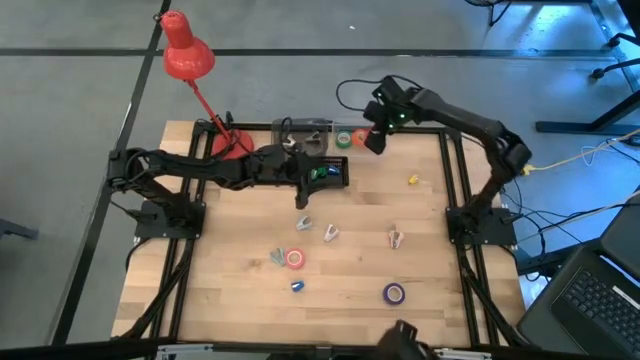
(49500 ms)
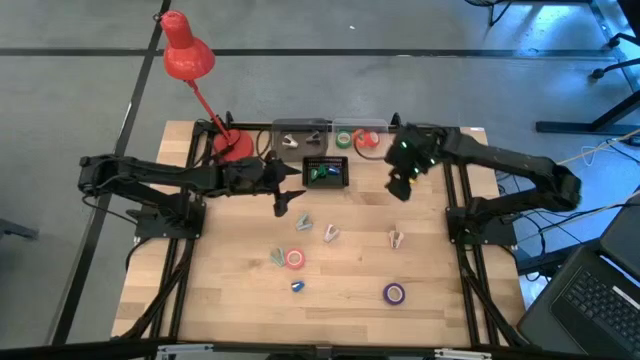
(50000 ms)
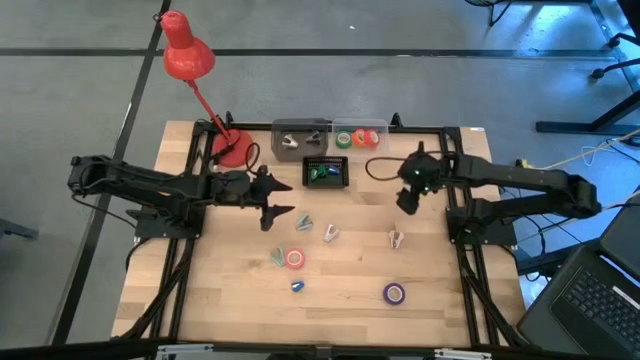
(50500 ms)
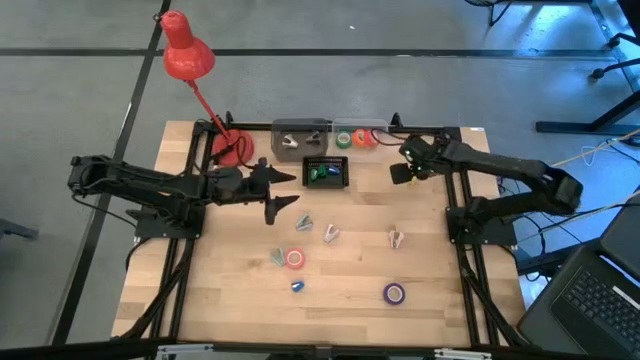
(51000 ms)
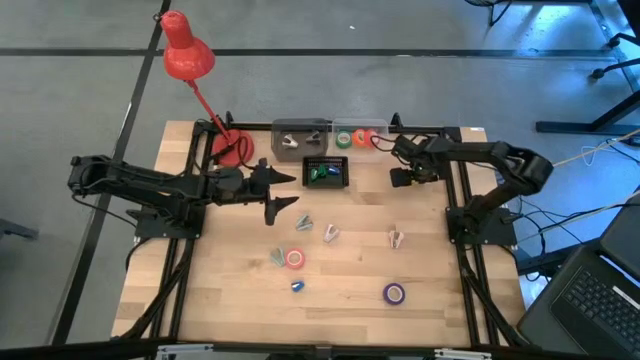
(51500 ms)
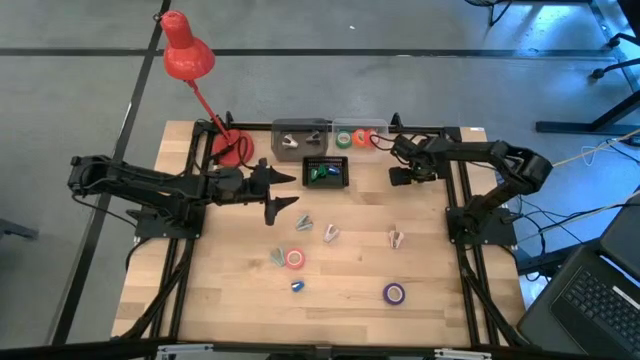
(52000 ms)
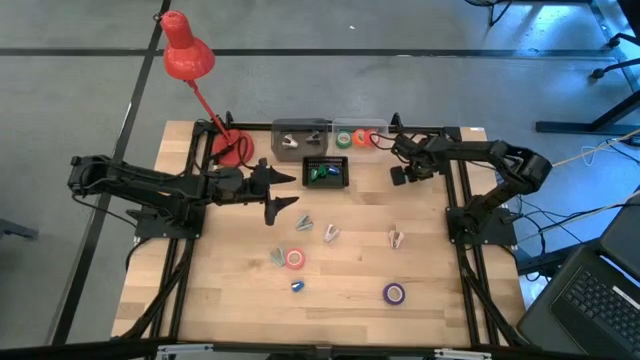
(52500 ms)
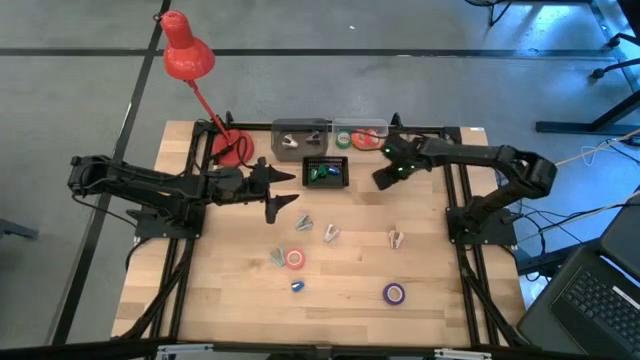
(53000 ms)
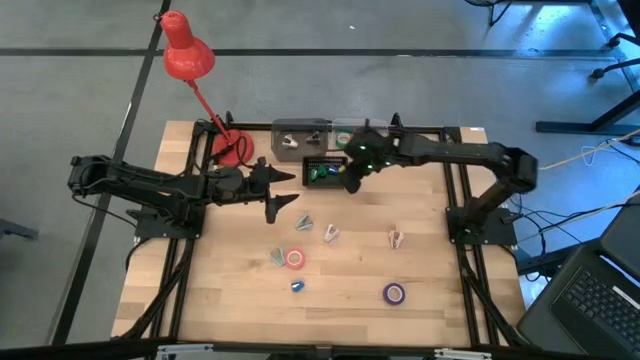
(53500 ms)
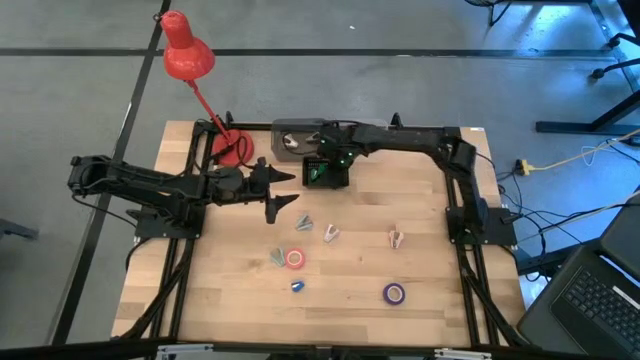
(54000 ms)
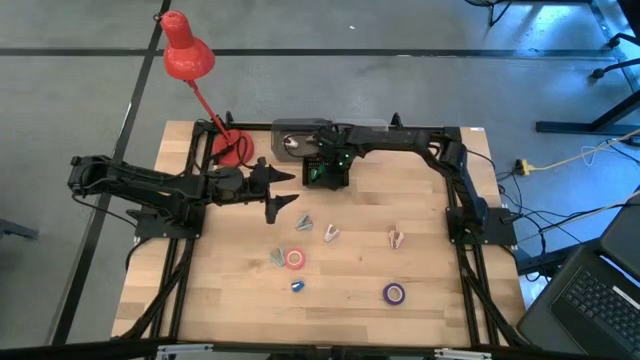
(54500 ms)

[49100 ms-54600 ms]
Task: Pick and place Stapler, Stapler remover, tape
Put the yellow stapler into the black bin

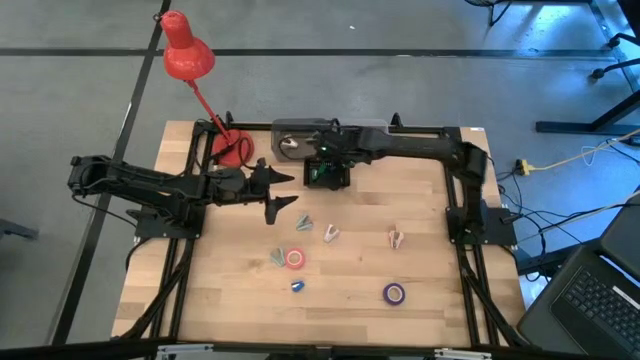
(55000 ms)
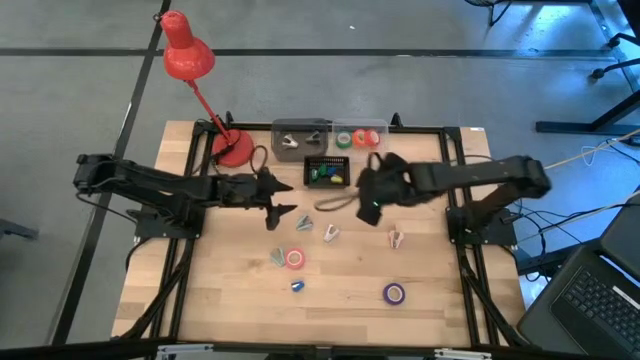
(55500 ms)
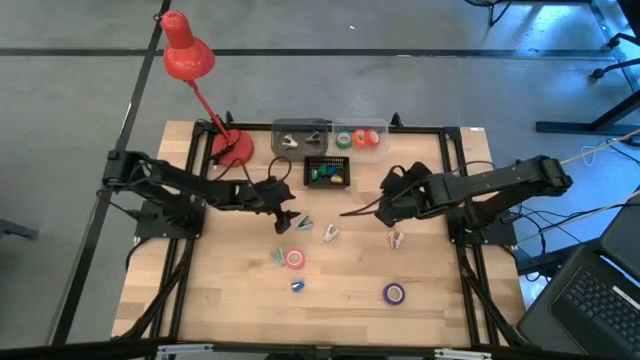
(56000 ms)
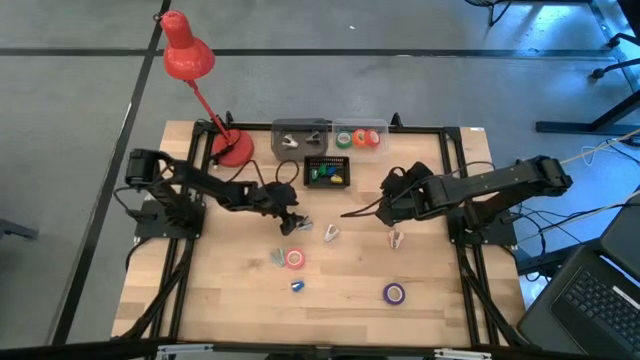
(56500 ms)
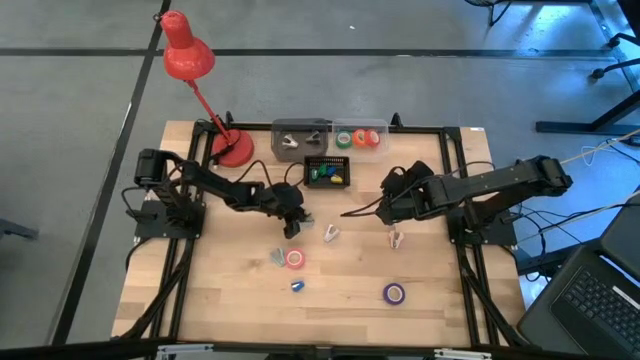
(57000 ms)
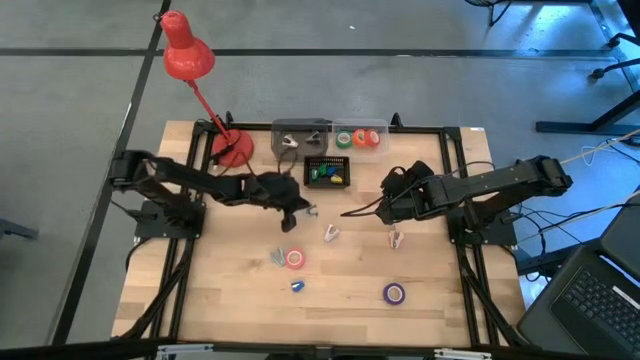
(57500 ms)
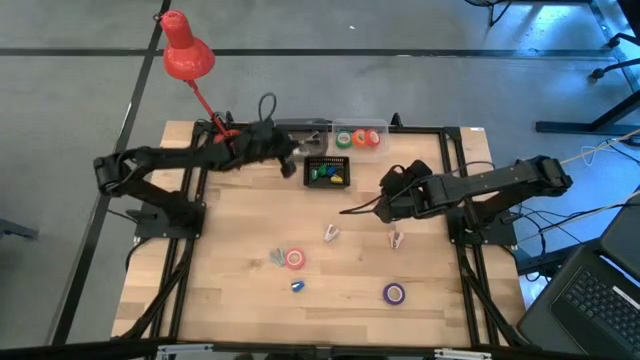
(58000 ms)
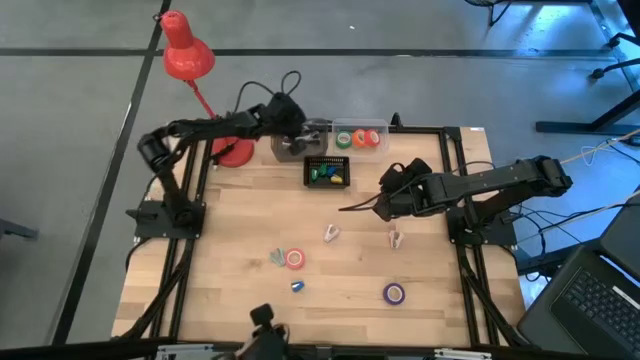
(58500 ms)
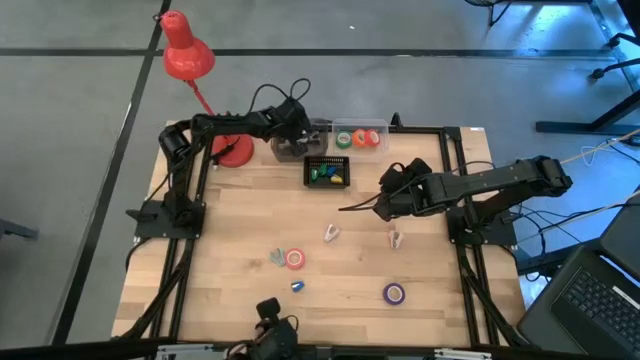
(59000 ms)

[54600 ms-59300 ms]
Put the blue staple remover into the gray bin

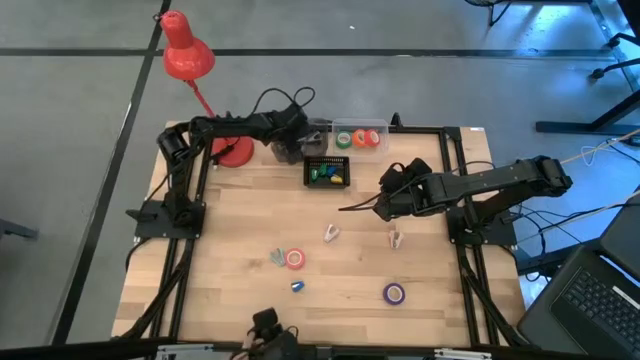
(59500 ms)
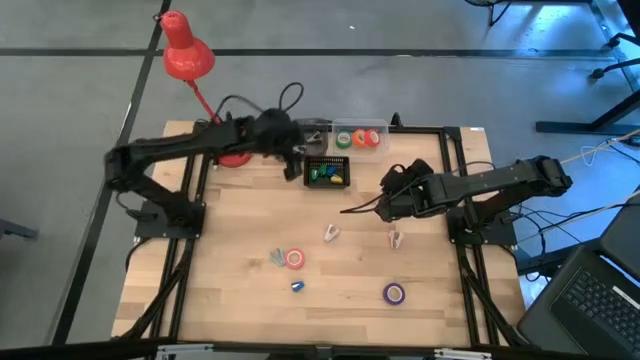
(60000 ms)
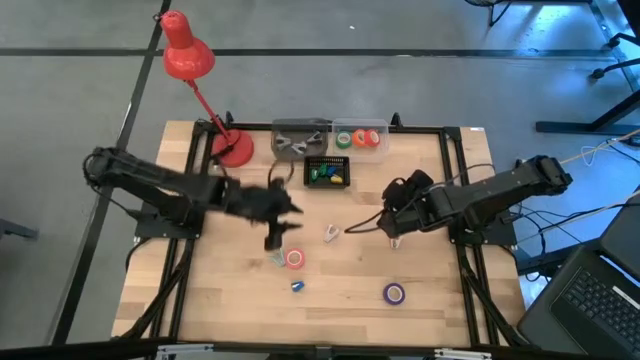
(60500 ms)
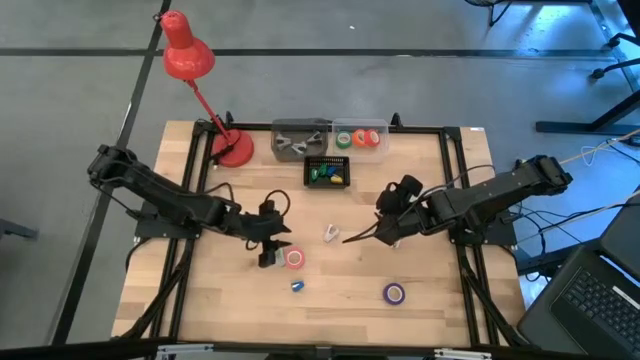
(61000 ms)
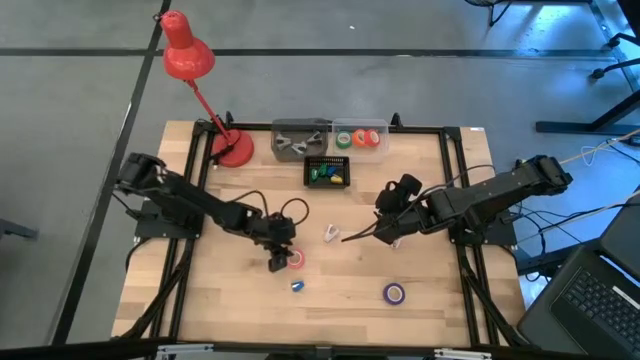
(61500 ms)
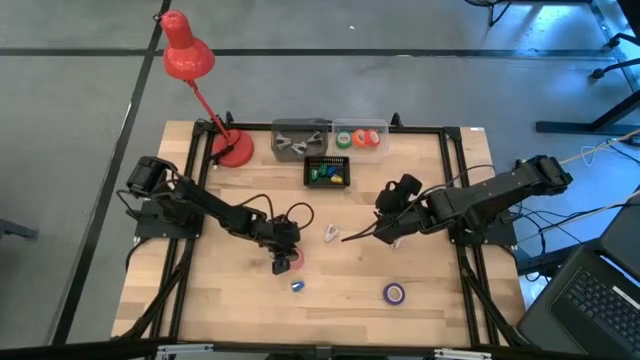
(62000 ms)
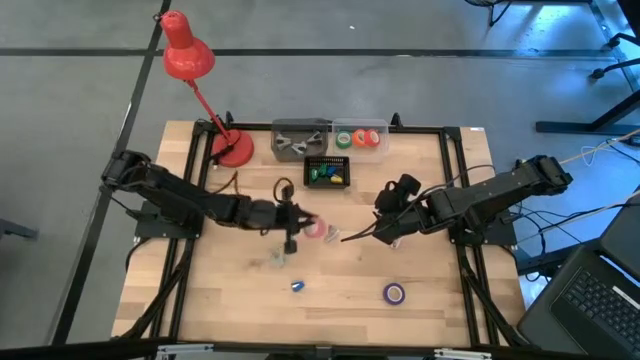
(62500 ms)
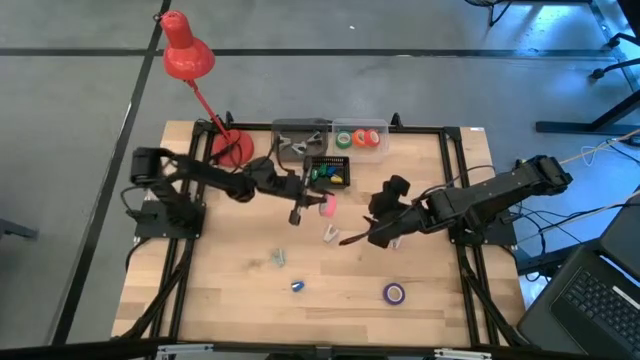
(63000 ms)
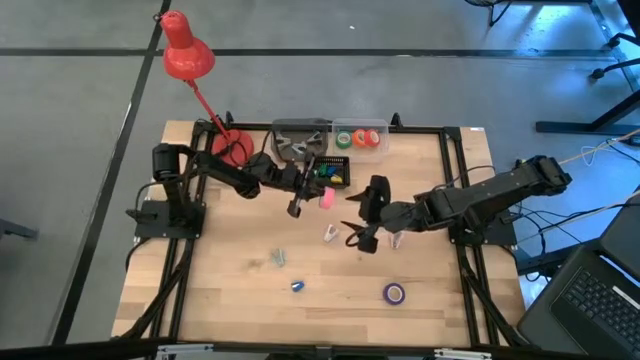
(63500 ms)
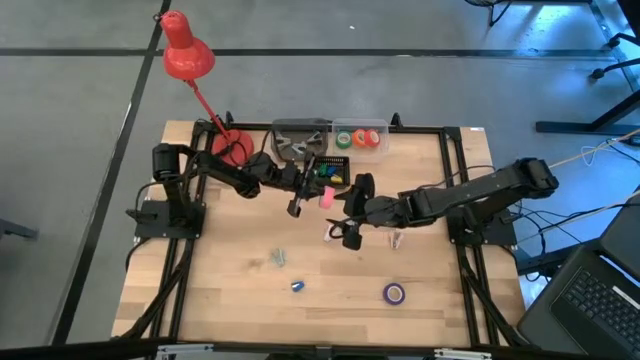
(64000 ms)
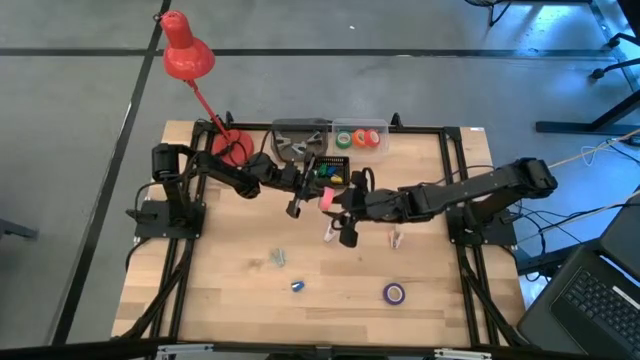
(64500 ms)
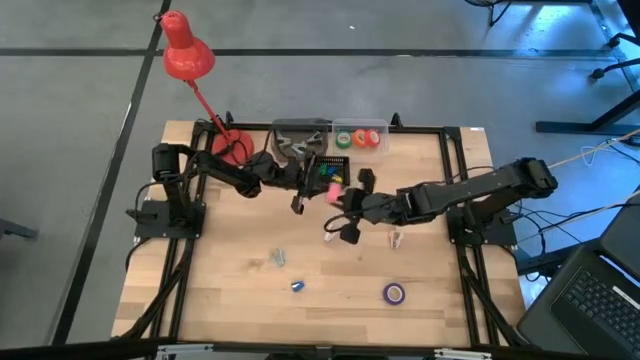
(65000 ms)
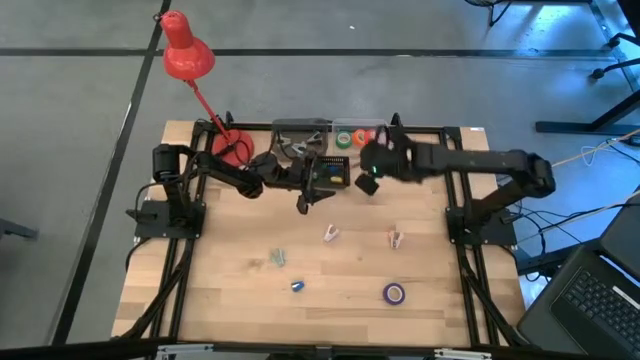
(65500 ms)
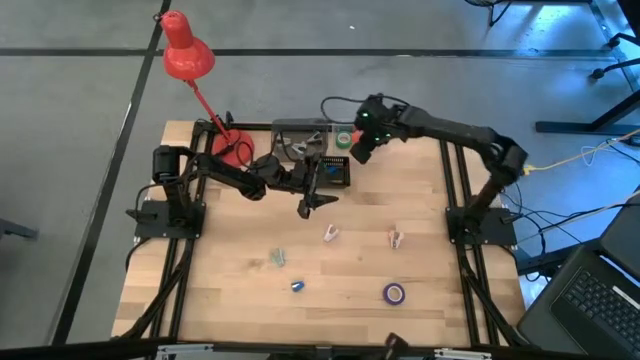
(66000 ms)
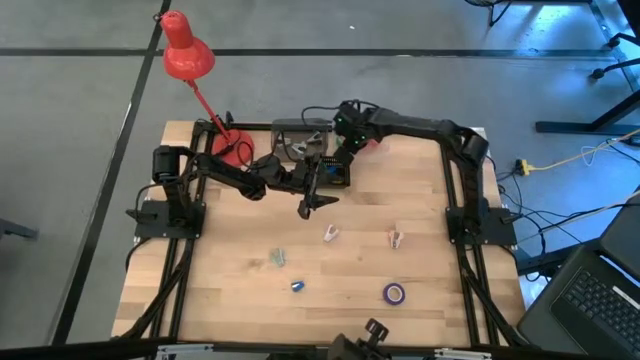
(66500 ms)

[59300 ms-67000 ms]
Put the pink tape into the transparent bin

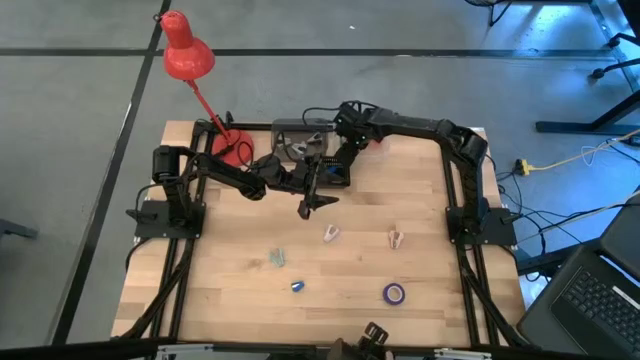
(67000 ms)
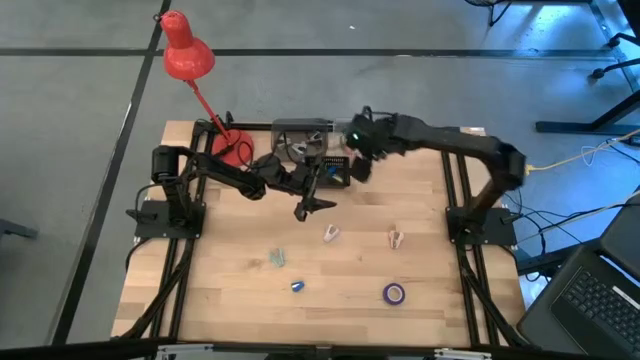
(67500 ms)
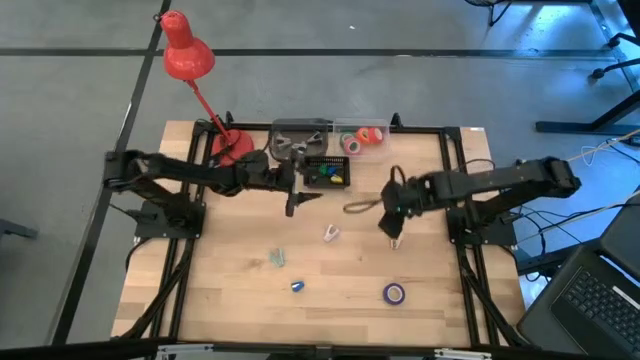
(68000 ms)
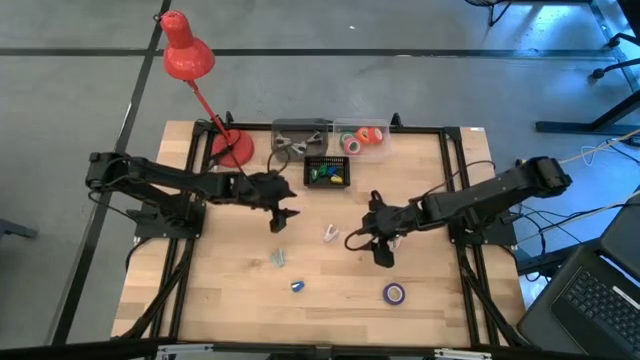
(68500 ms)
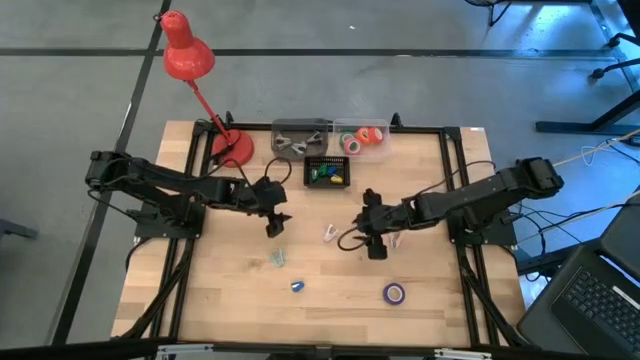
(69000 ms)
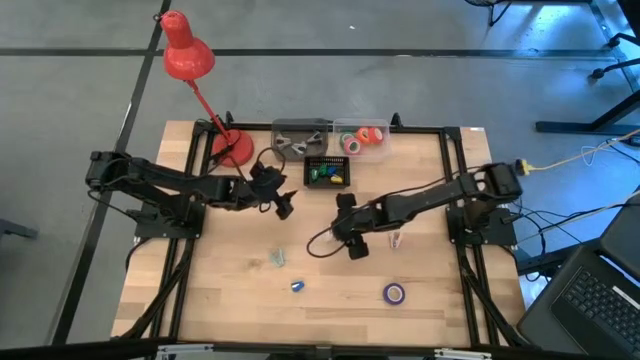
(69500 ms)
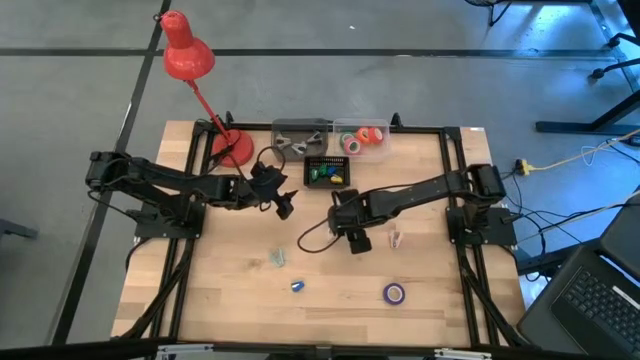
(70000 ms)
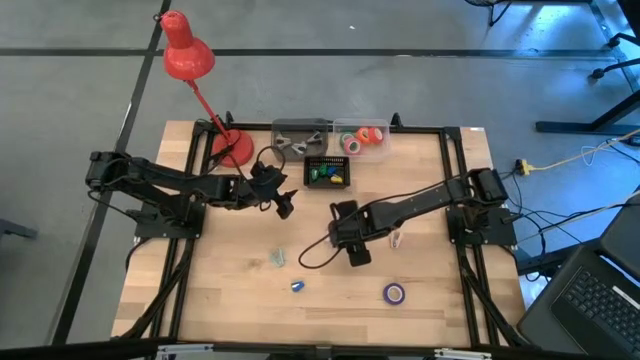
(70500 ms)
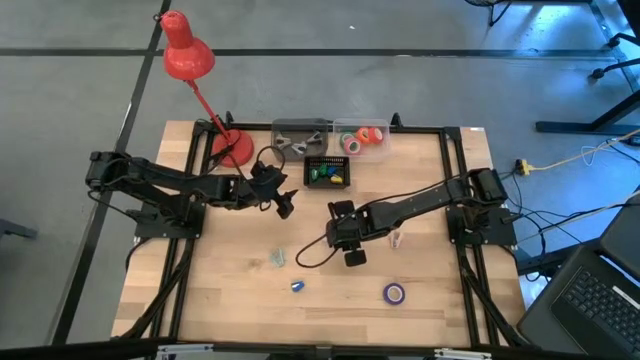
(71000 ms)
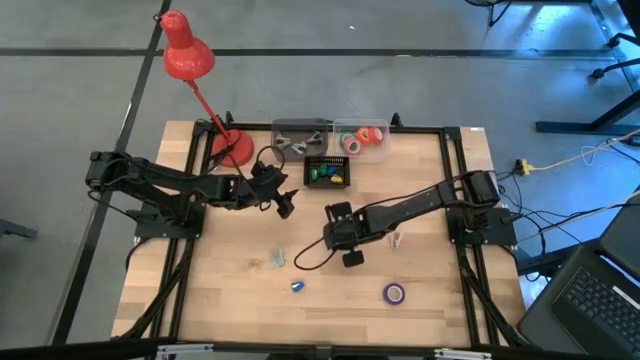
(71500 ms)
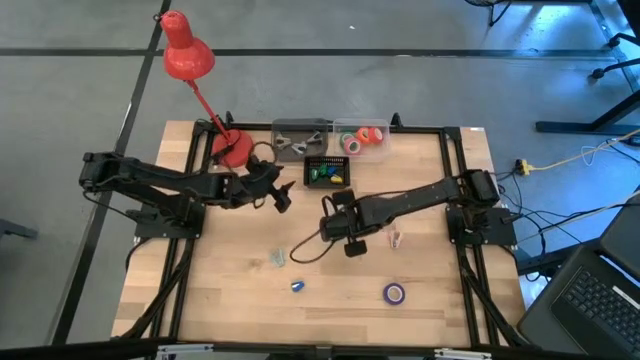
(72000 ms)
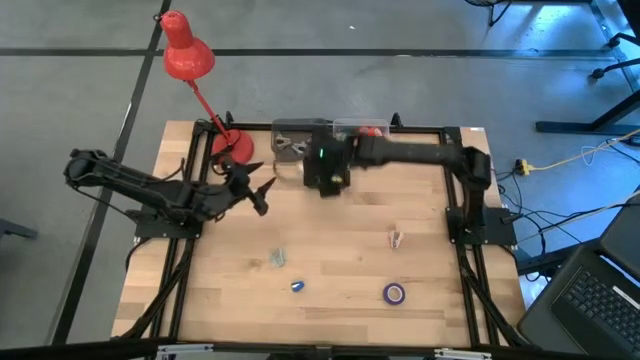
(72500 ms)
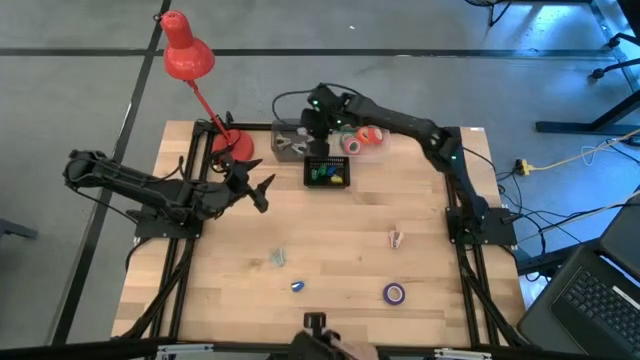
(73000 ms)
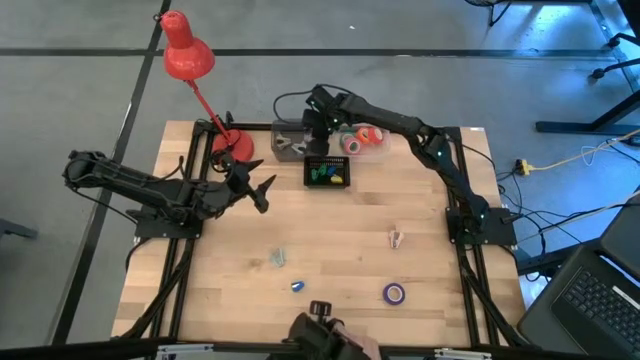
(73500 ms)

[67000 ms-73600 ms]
Put the purple staple remover into the gray bin
